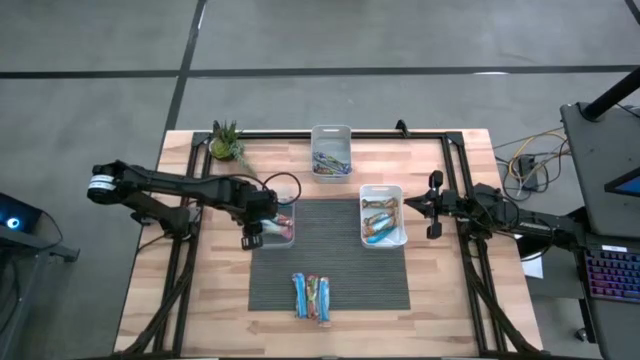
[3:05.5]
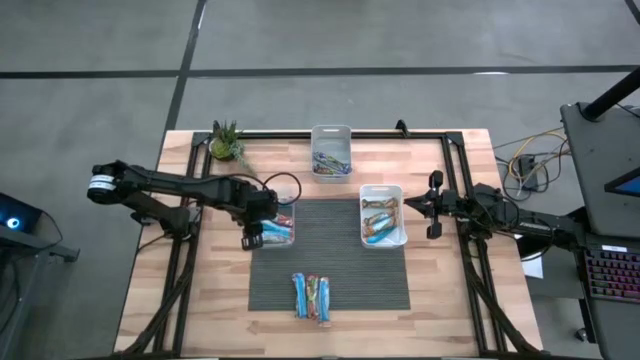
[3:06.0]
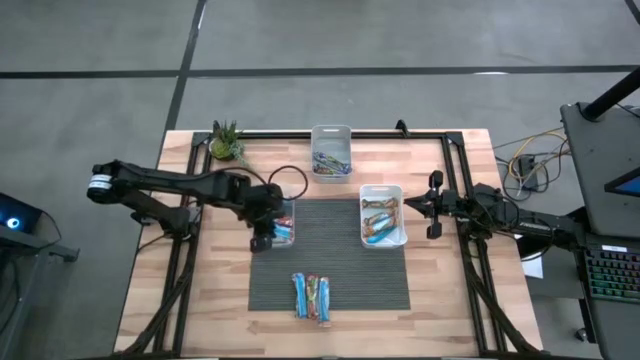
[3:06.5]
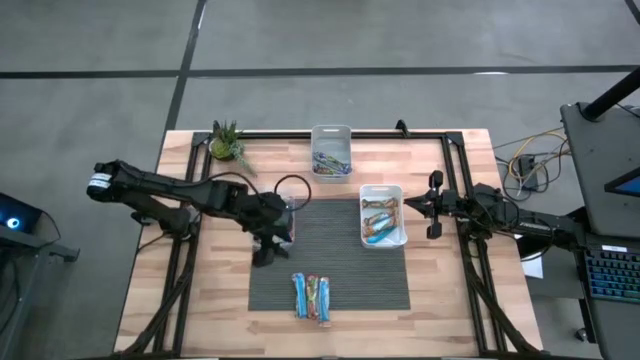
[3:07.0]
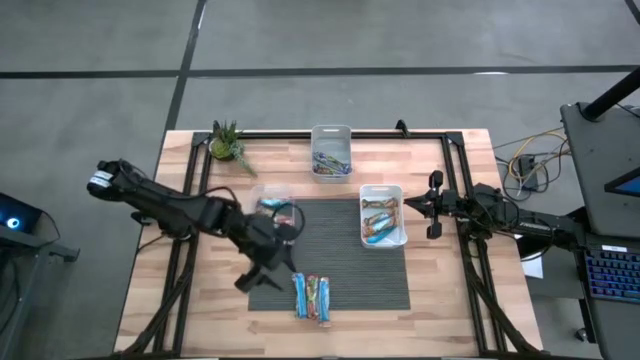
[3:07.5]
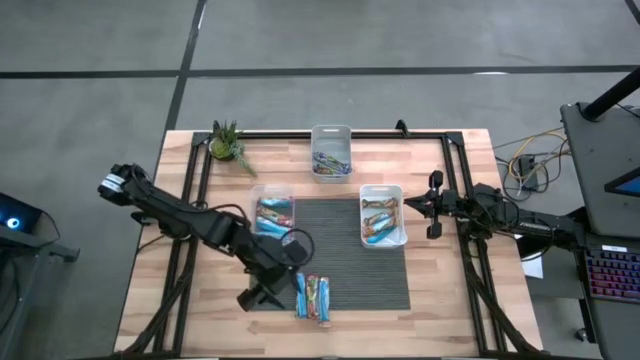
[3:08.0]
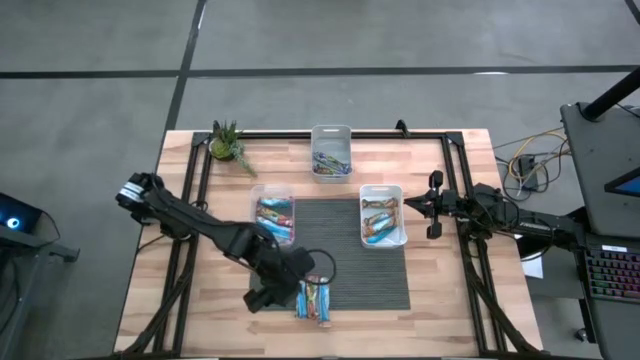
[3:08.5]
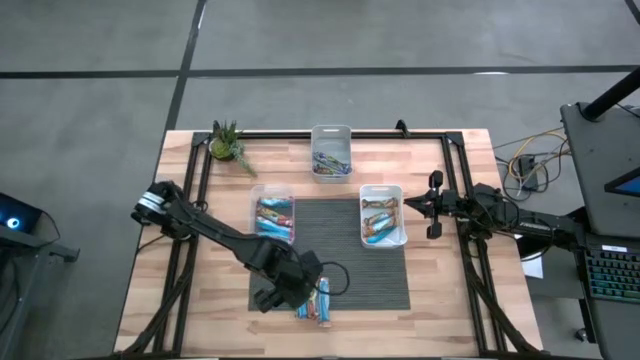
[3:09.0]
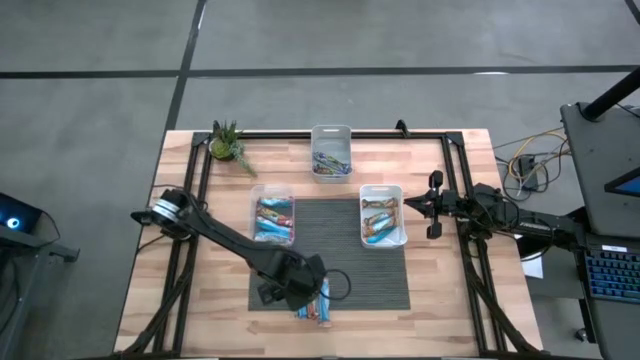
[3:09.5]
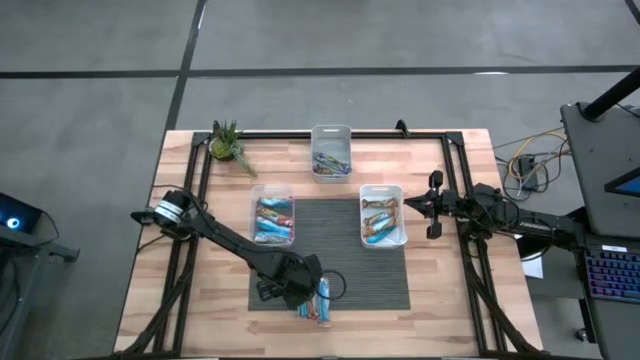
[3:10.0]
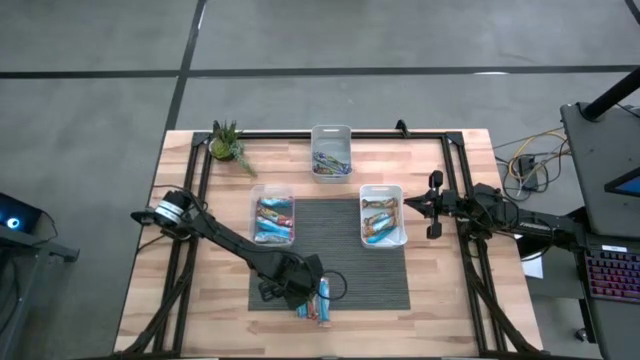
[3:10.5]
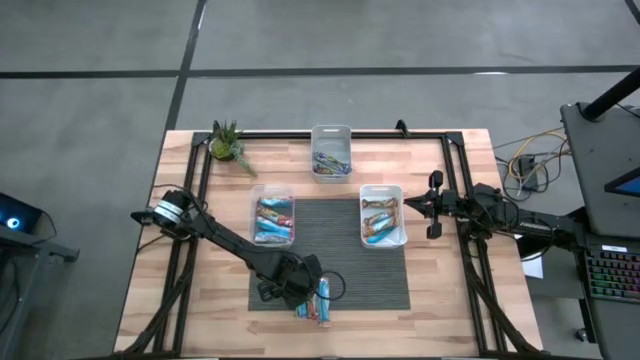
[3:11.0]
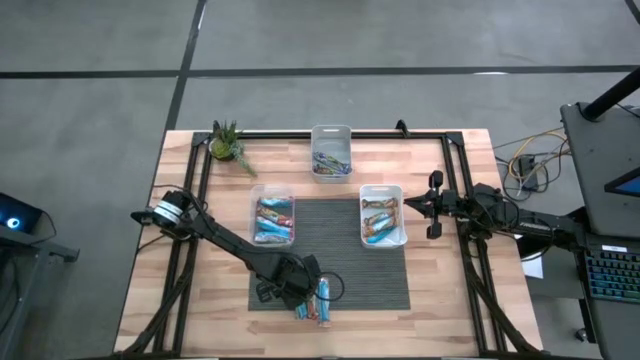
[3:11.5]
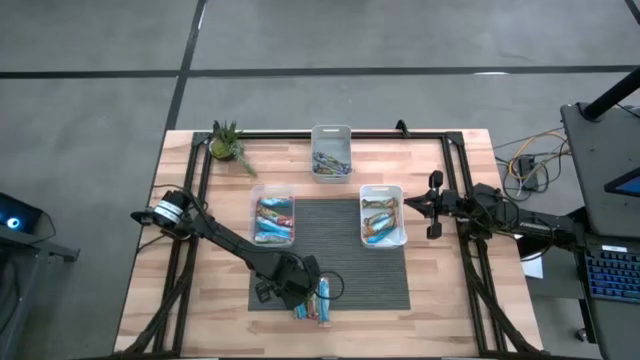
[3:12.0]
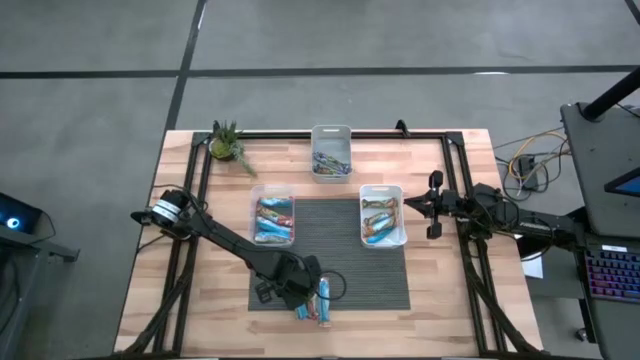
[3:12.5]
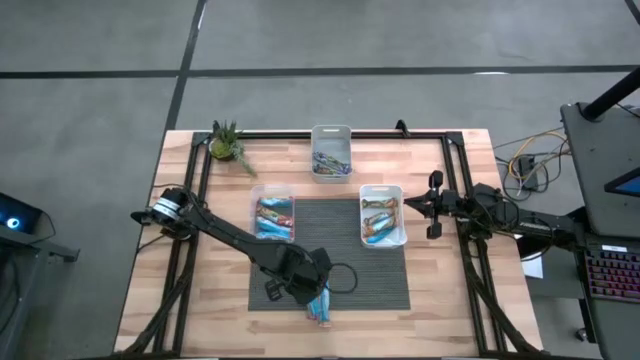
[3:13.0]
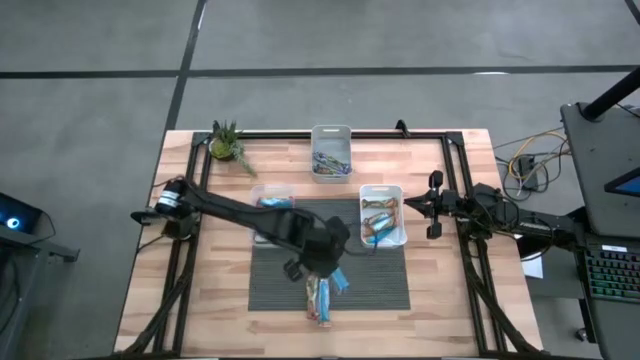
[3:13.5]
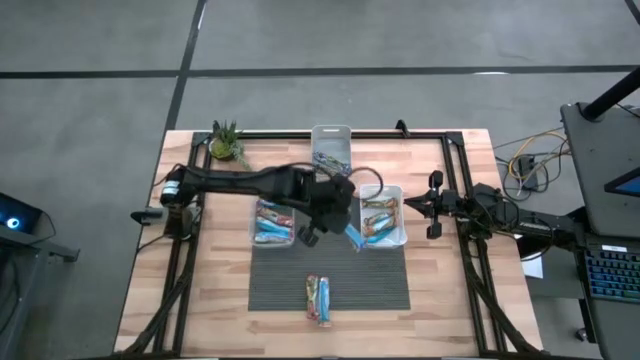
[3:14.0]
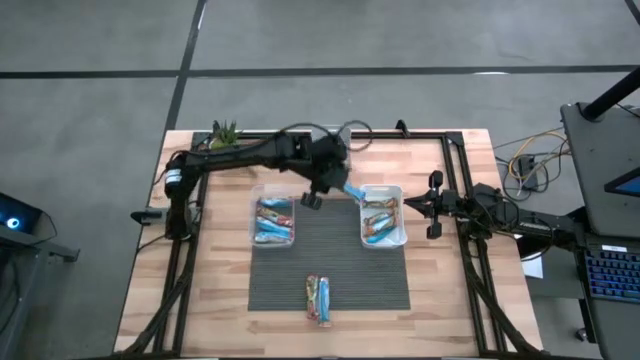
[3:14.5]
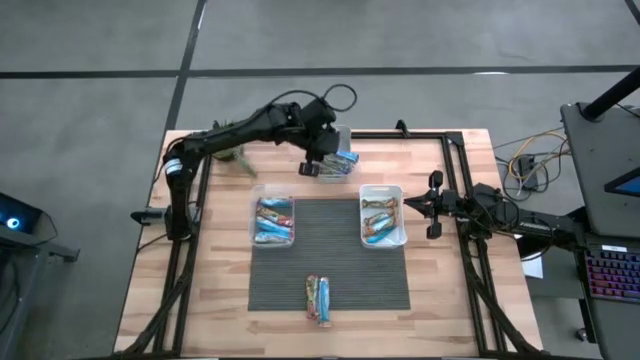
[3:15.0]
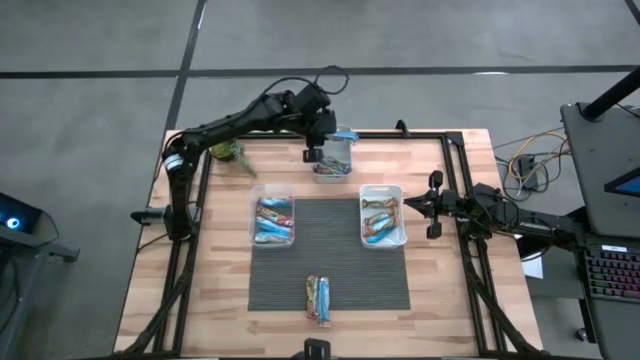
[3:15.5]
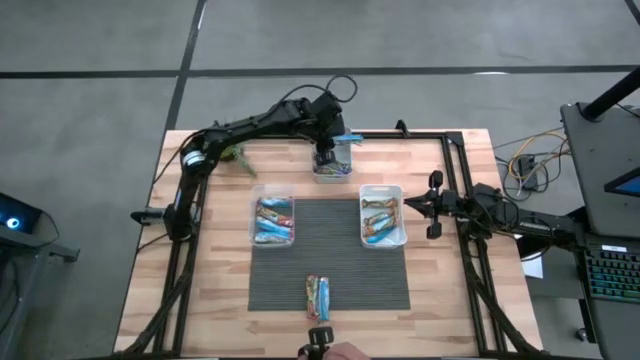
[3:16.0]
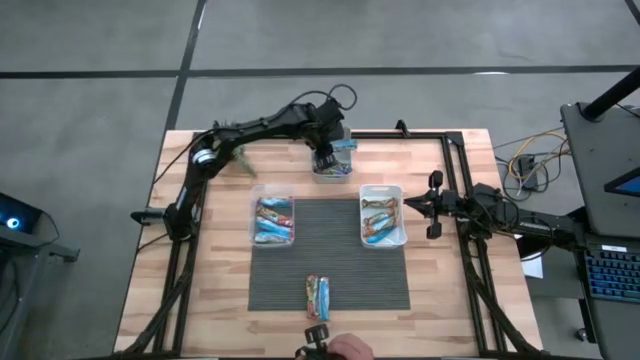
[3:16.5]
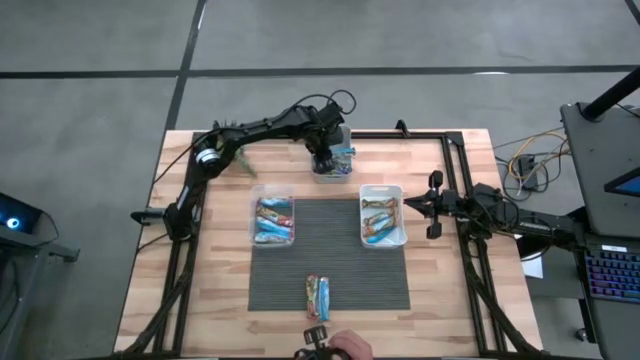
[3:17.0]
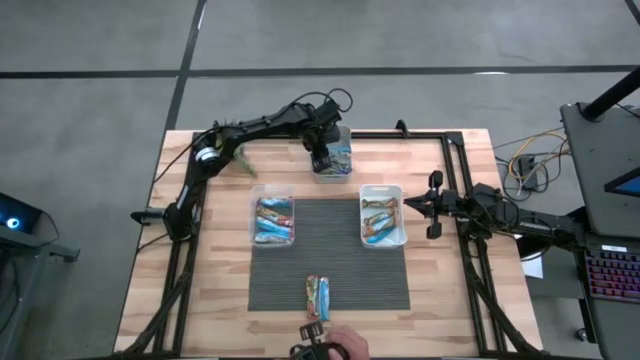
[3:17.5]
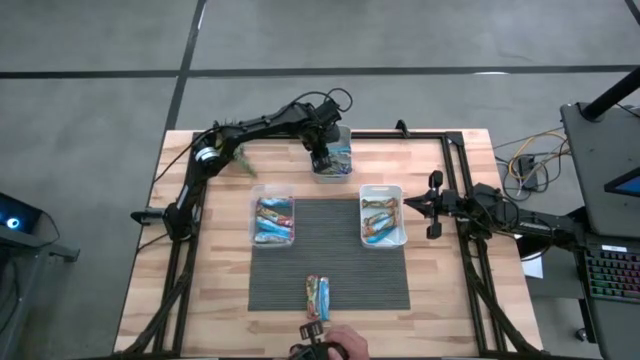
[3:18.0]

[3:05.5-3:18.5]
Task: Pick and place Granola Bars by type
Put the blue granola bar into the gray bin

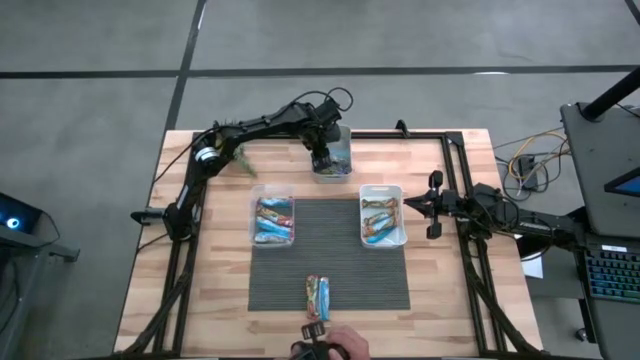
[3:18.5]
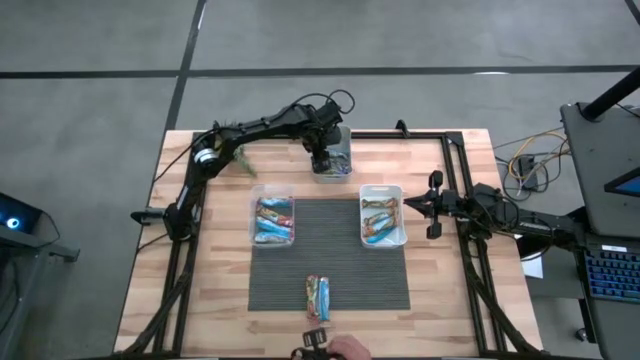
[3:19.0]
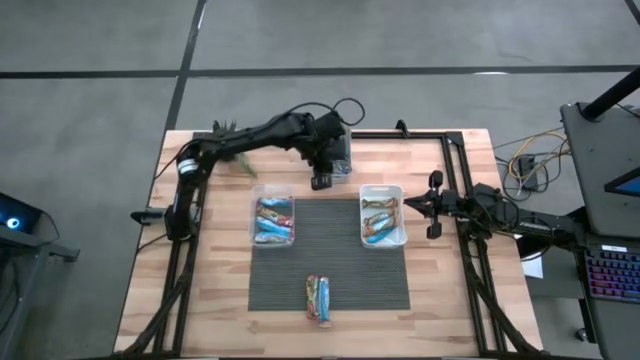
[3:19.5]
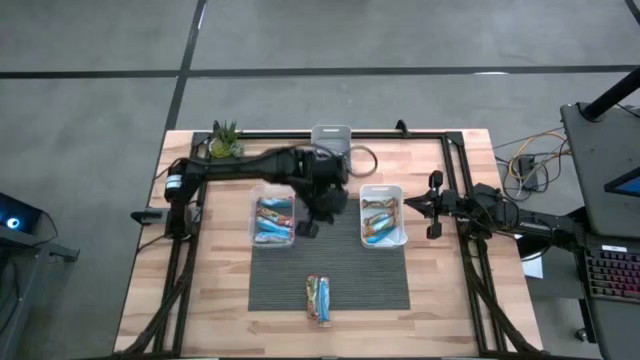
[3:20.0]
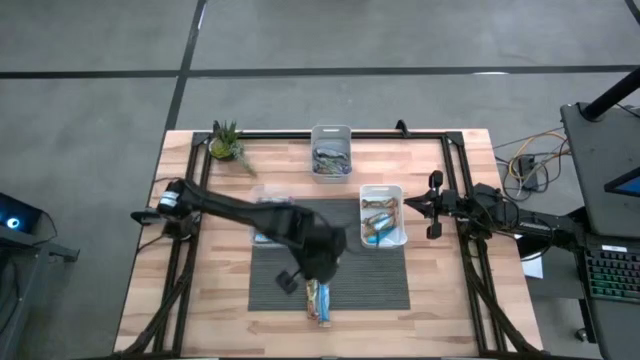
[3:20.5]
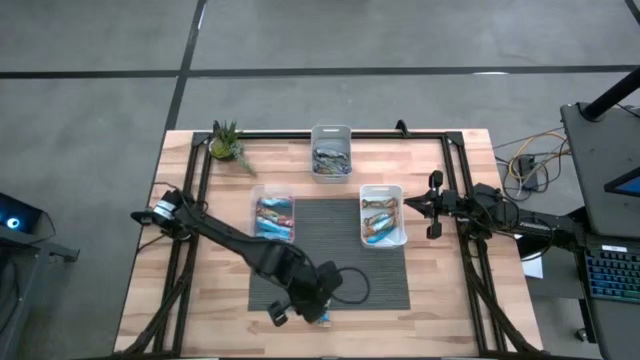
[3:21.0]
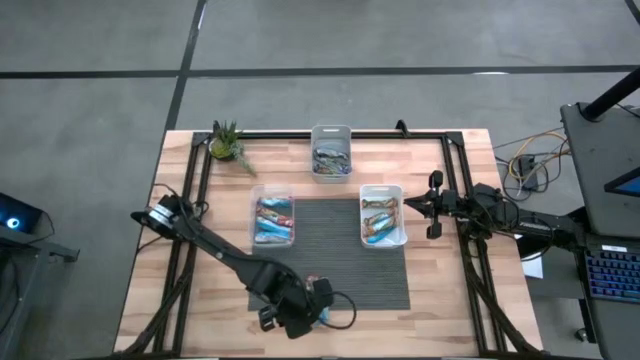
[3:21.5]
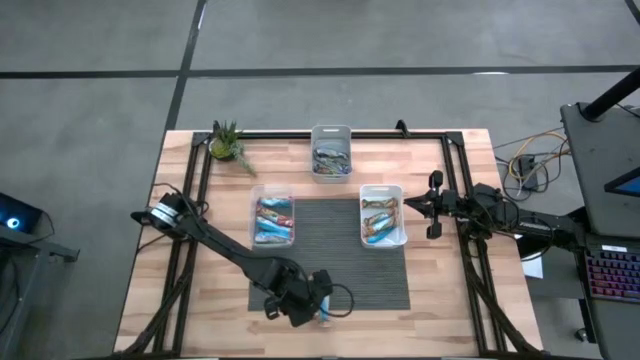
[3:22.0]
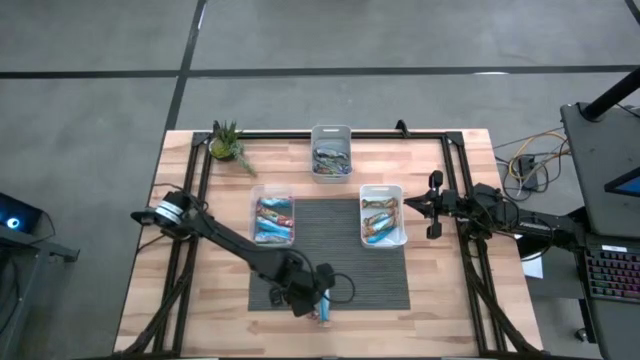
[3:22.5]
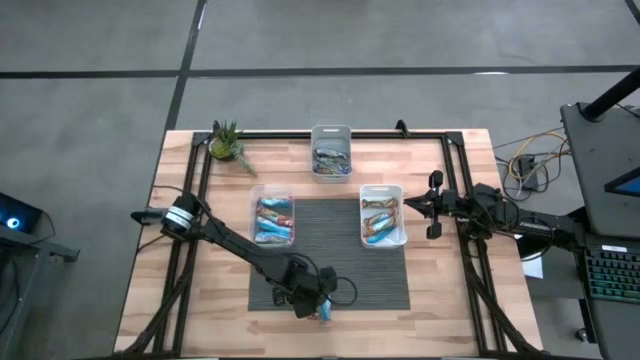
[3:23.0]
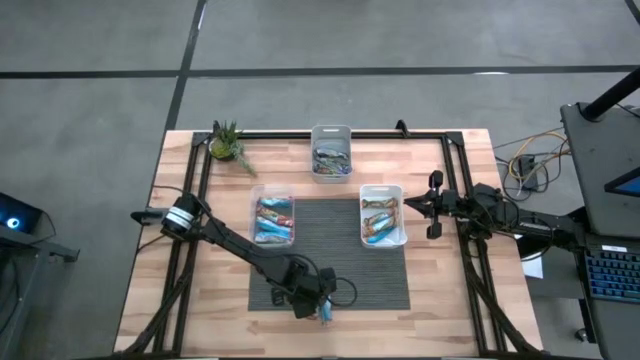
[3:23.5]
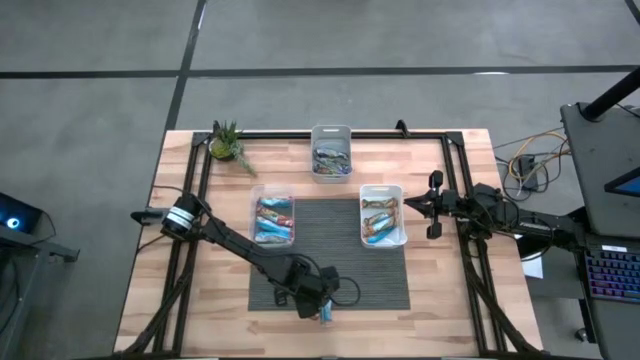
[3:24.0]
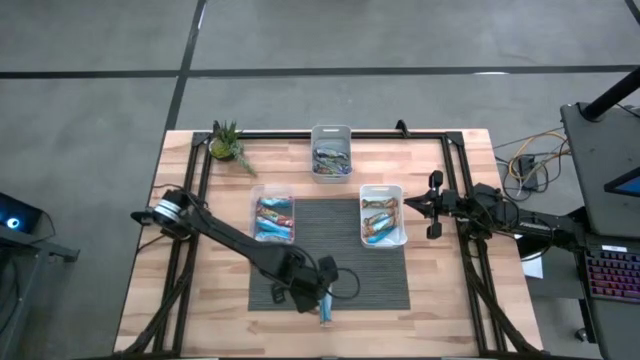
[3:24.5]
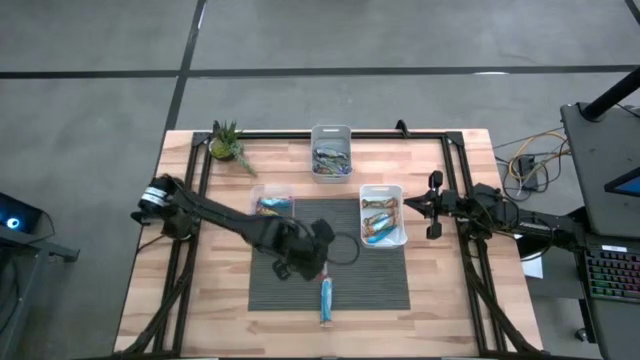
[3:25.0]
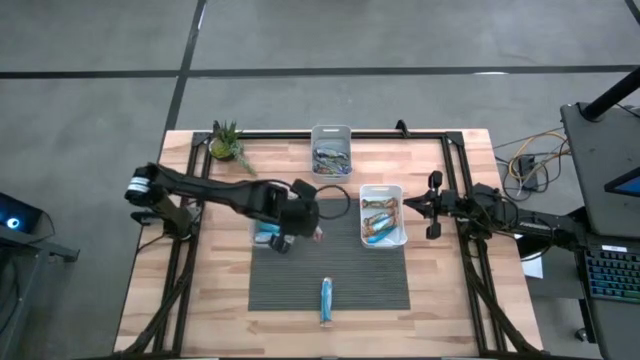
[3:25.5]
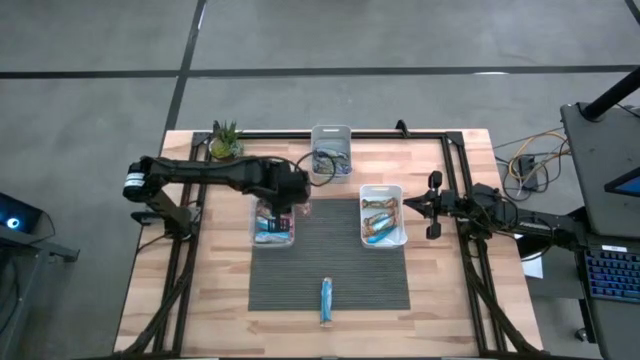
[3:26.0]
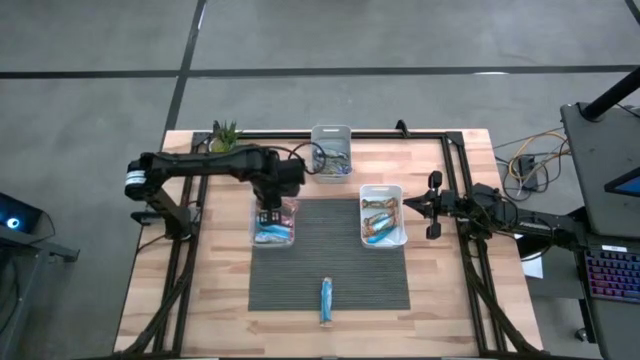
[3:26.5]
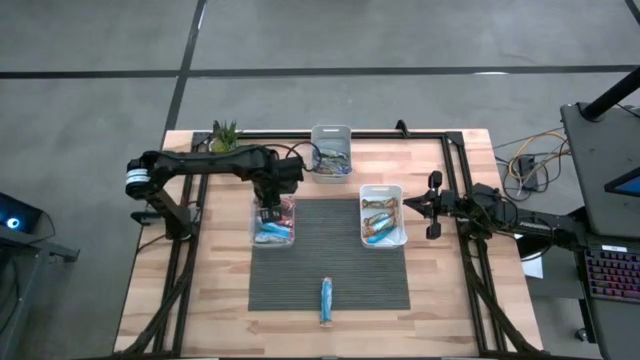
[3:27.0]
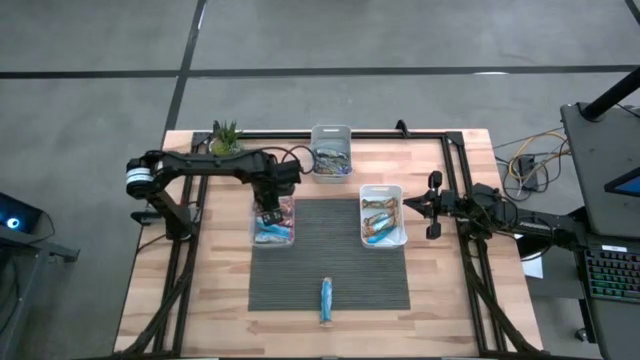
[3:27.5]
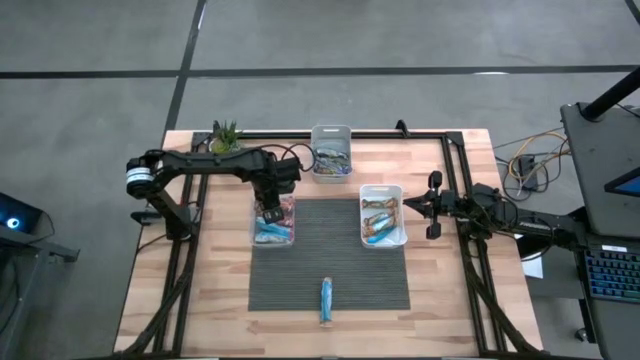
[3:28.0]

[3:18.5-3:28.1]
Put the red granola bar into the transparent bin
